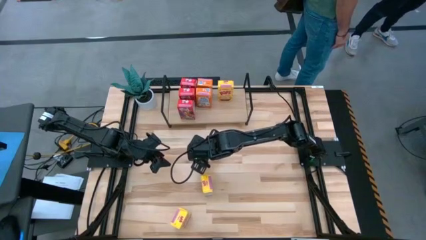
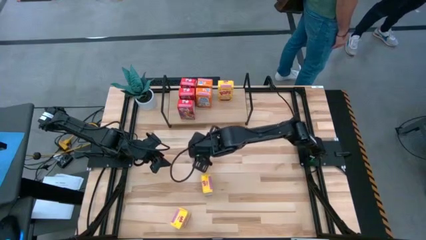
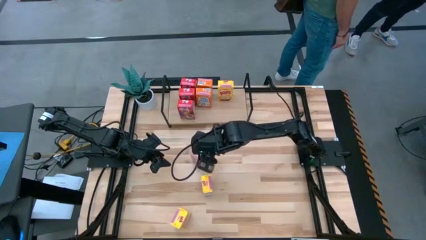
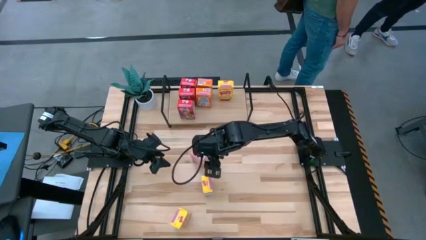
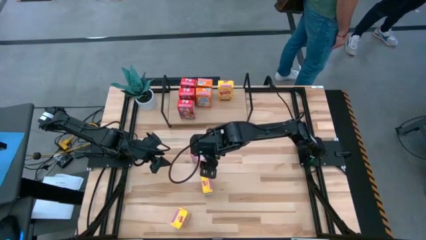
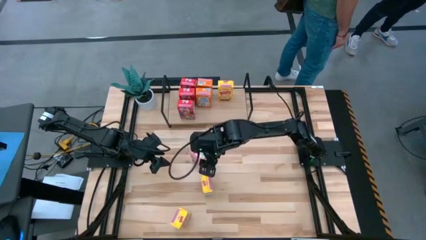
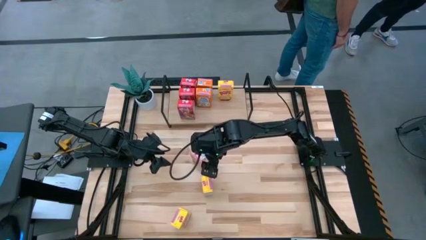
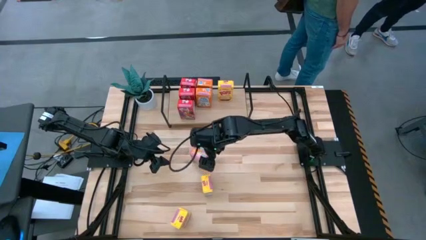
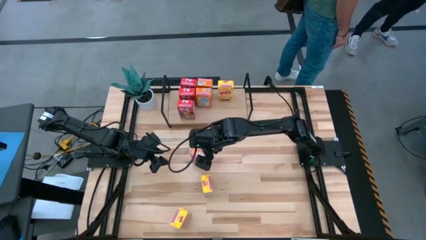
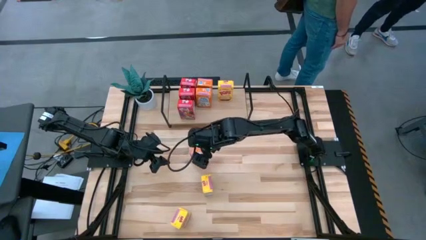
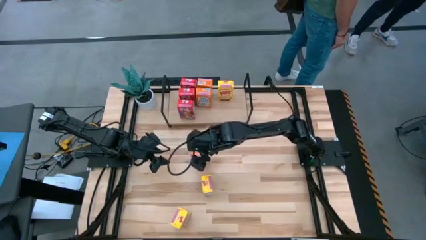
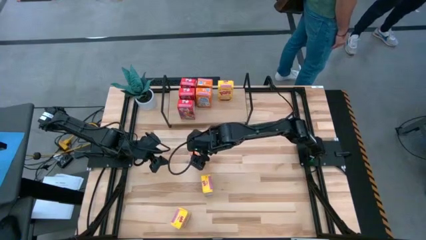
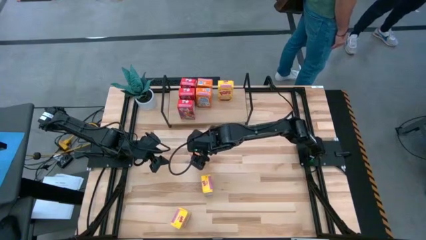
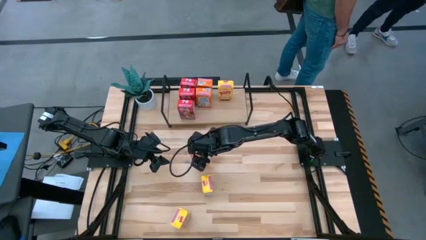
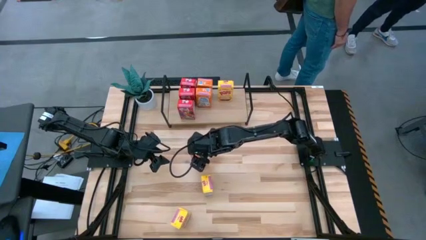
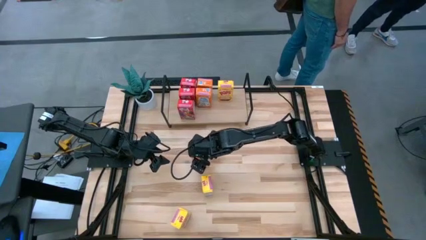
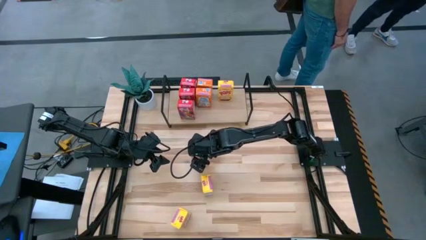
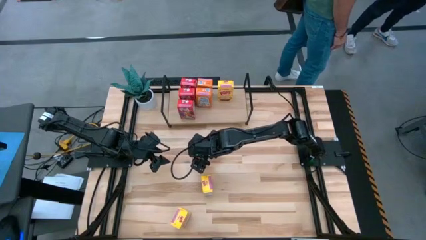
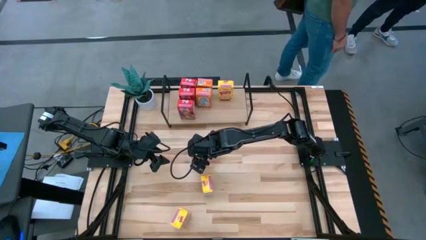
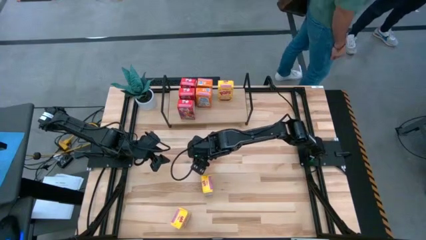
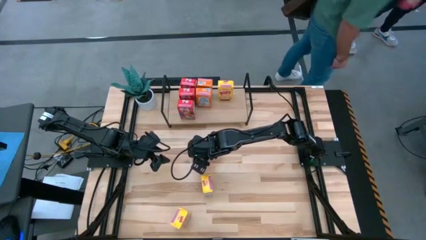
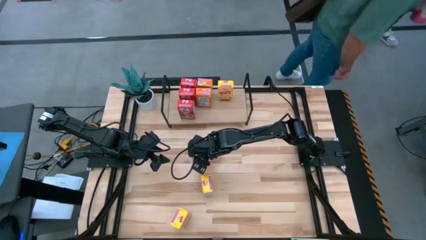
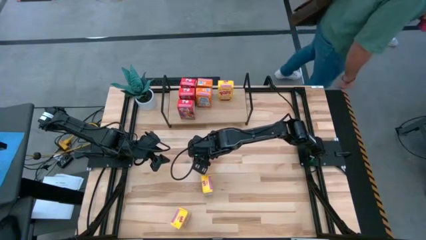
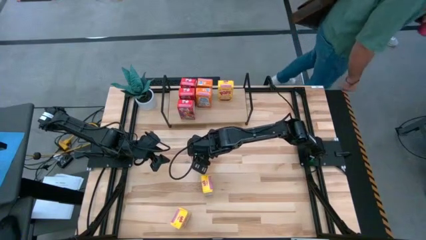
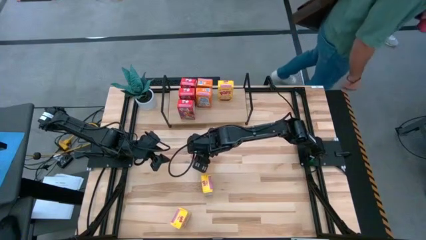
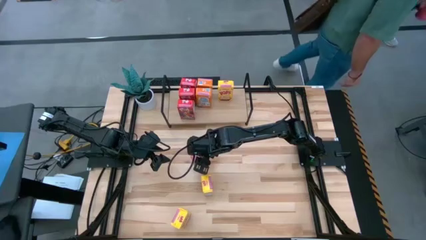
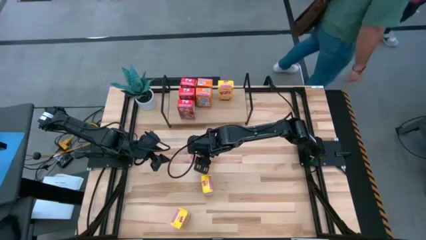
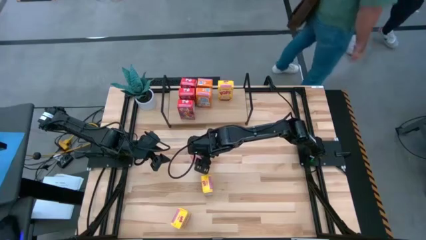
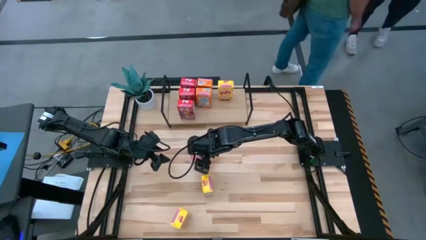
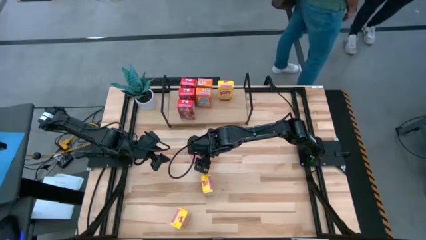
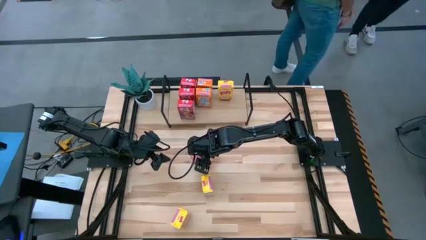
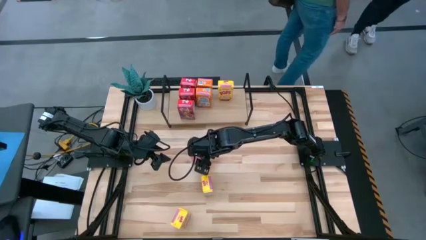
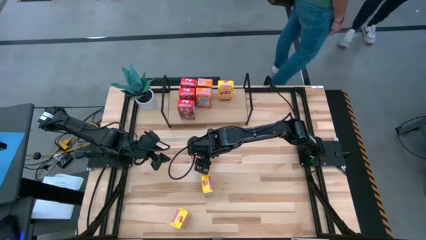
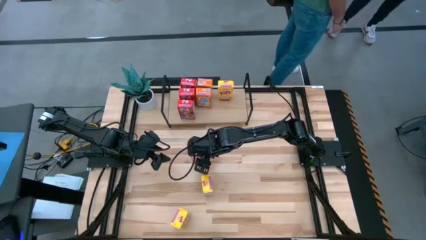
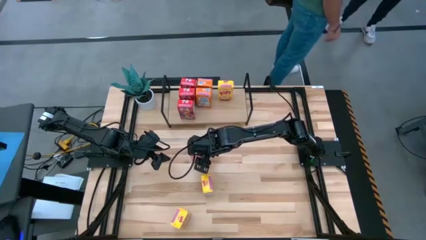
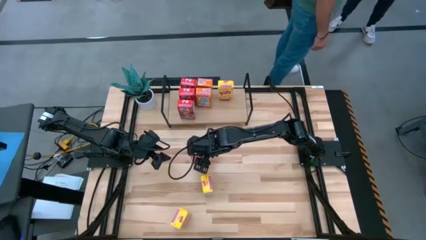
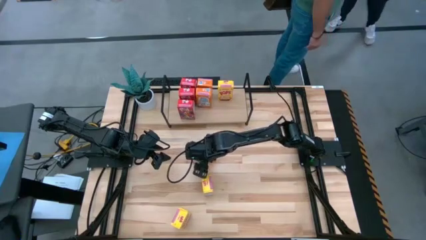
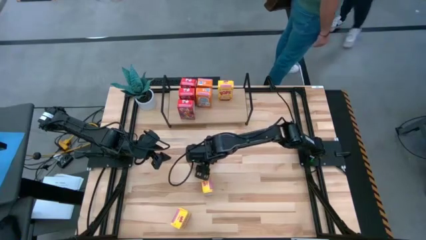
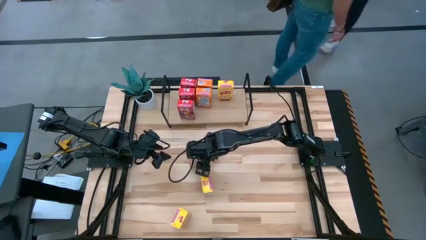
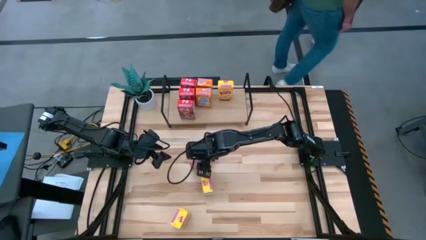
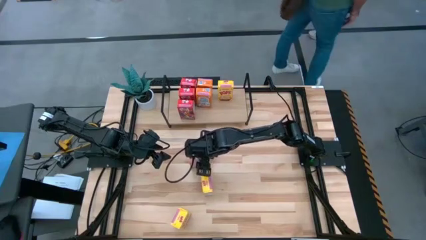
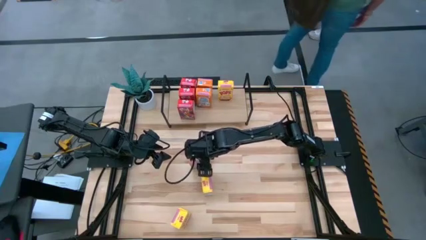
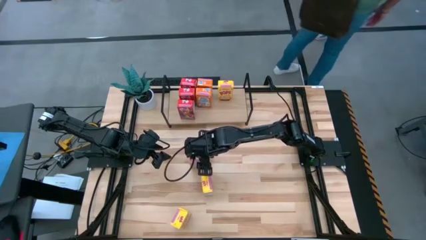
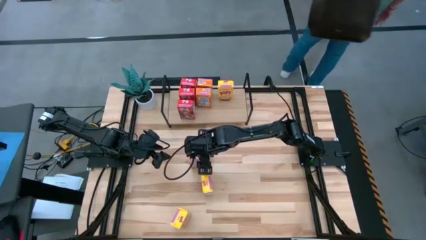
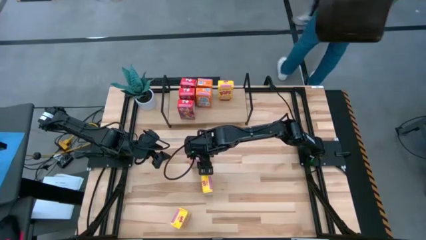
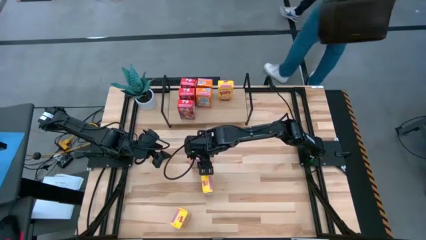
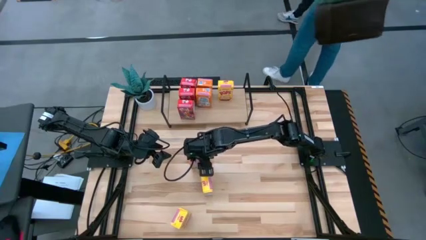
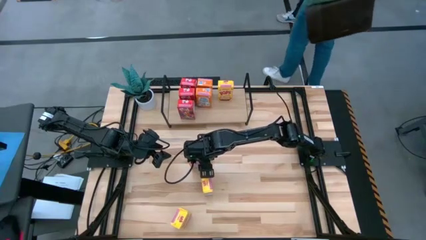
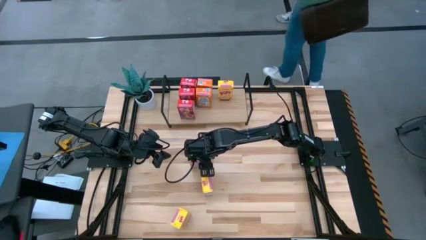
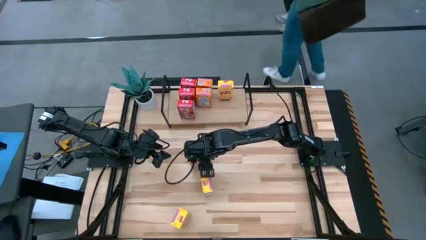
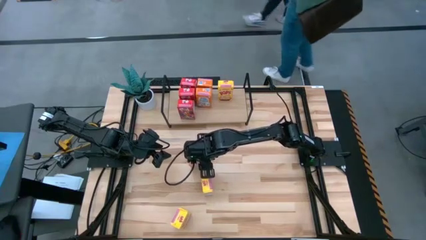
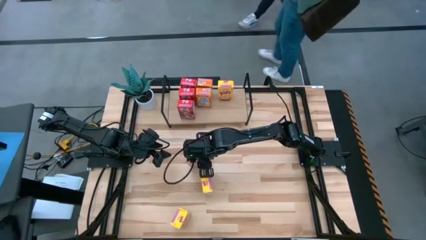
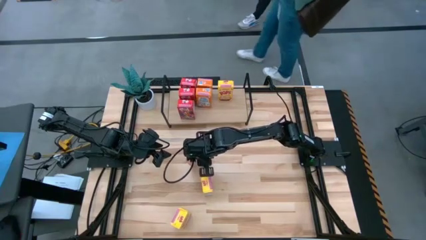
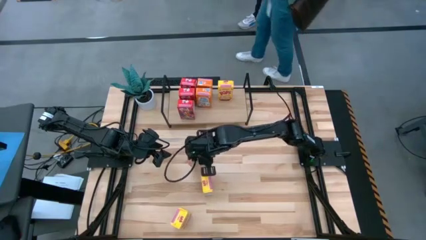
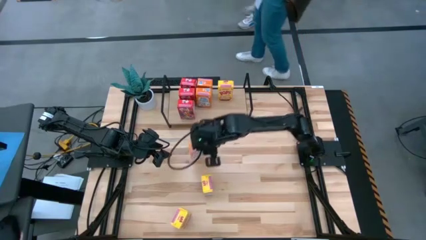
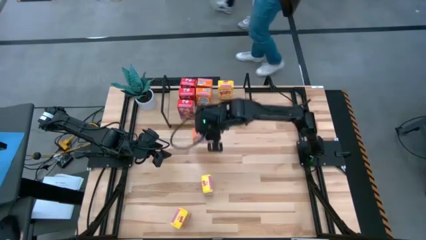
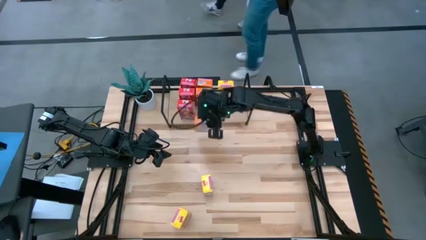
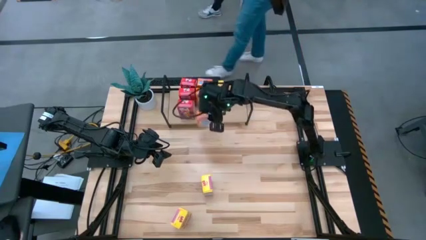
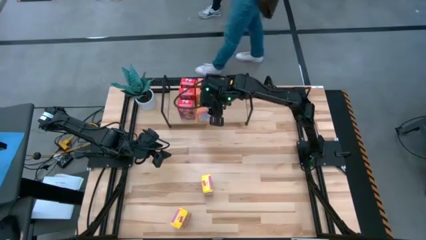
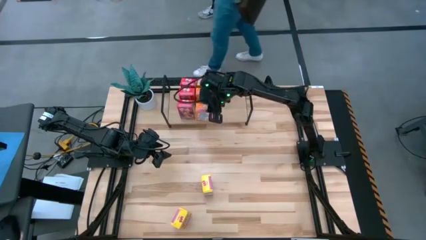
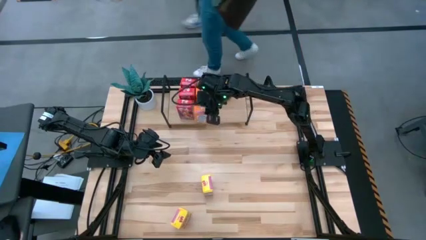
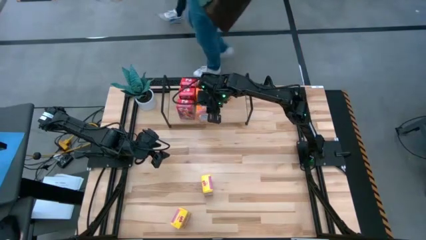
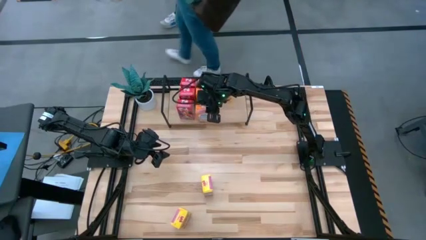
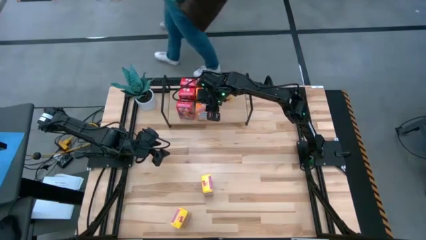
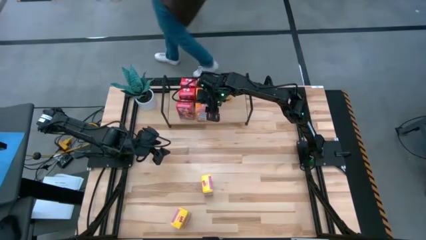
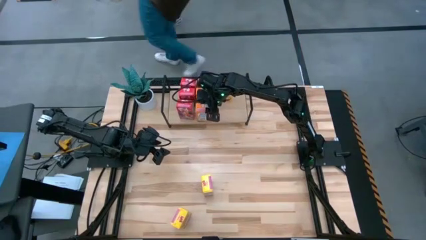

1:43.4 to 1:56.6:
Task: Stack cereal on shelf
Put the orange cereal box on the shelf aligned with the other orange cereal boxes
